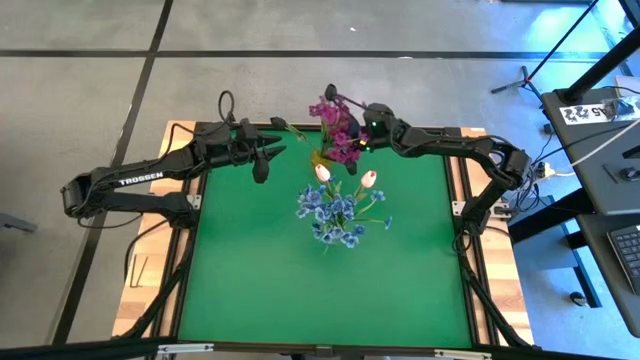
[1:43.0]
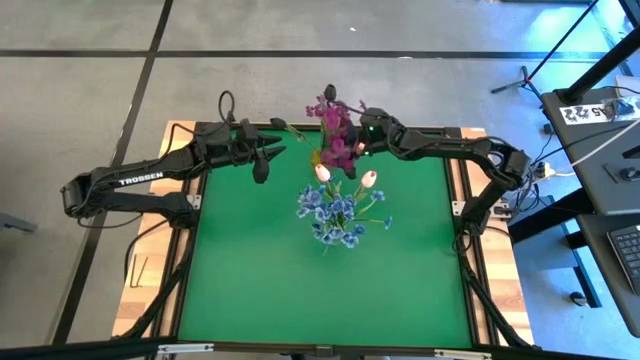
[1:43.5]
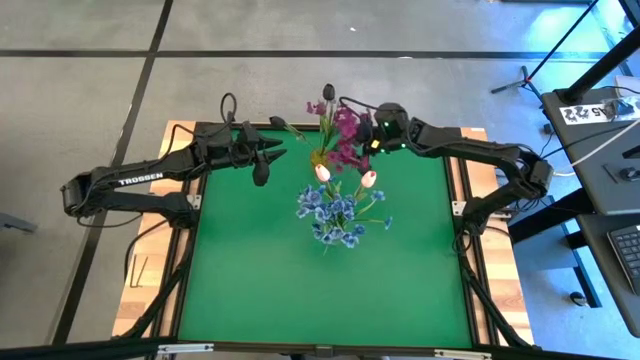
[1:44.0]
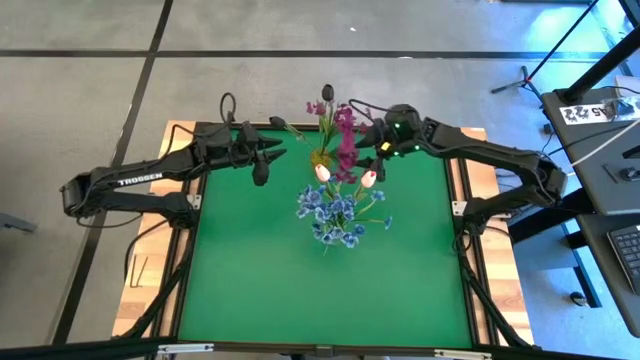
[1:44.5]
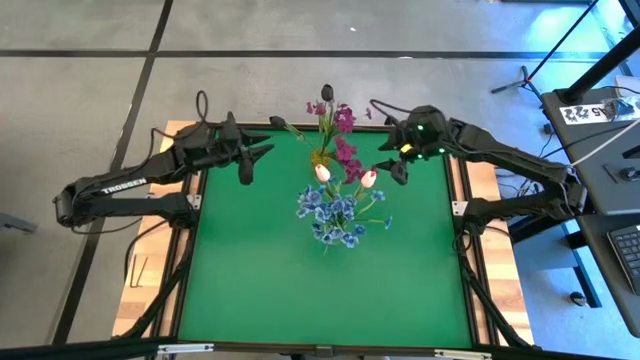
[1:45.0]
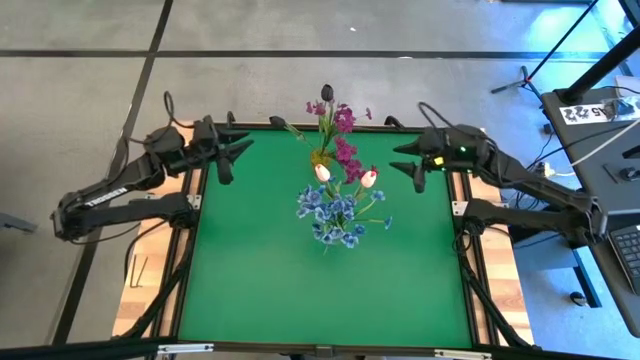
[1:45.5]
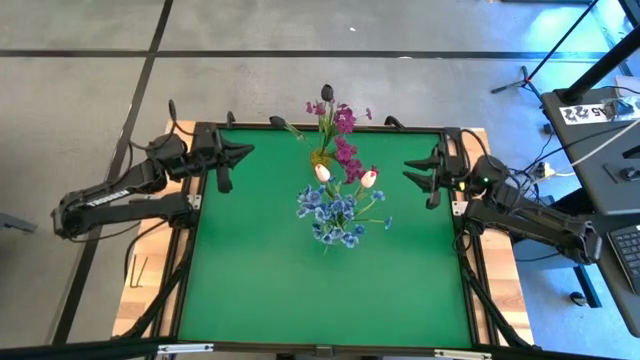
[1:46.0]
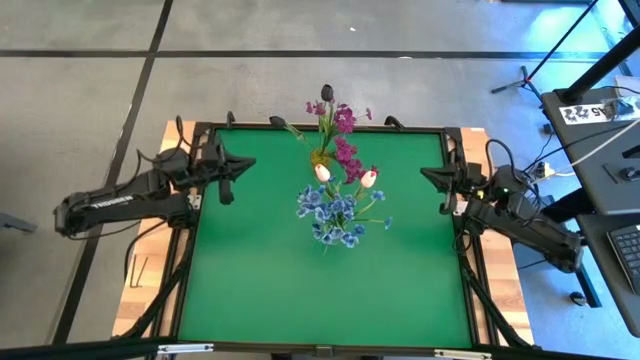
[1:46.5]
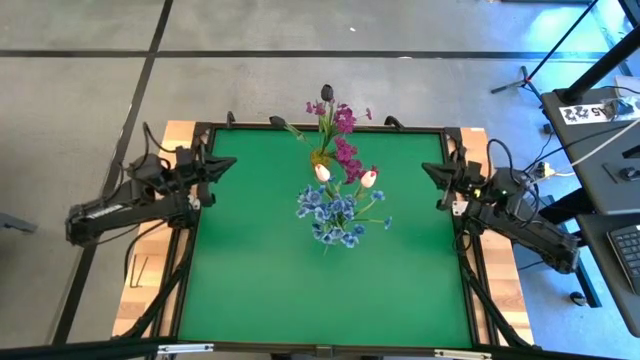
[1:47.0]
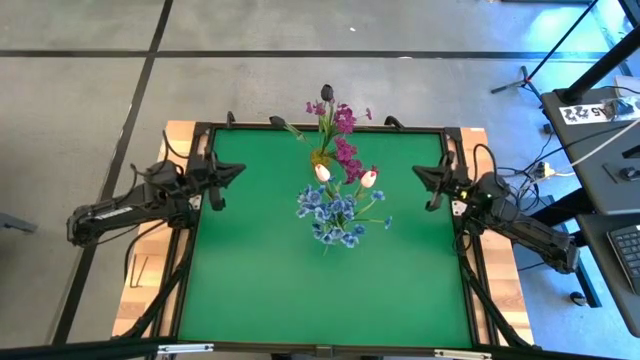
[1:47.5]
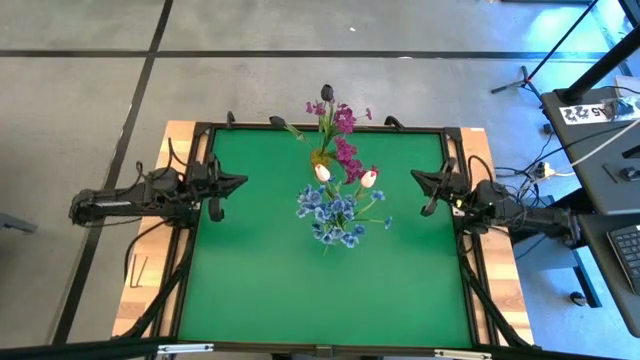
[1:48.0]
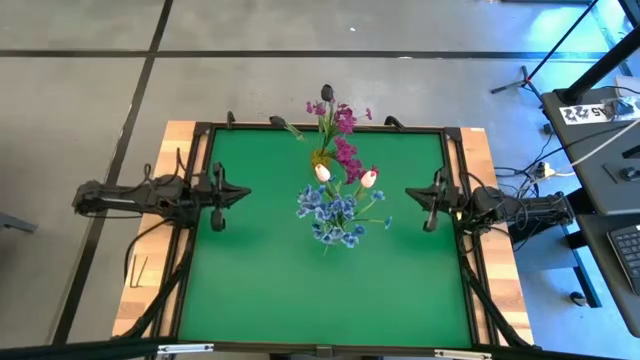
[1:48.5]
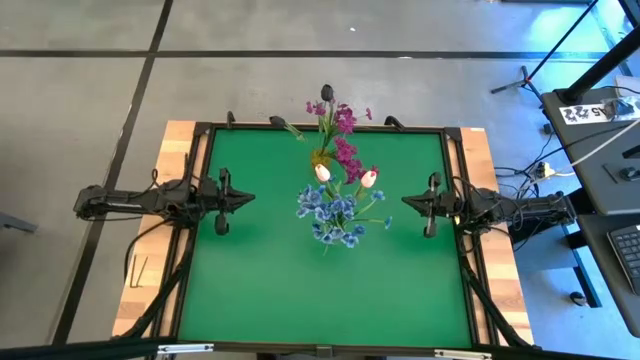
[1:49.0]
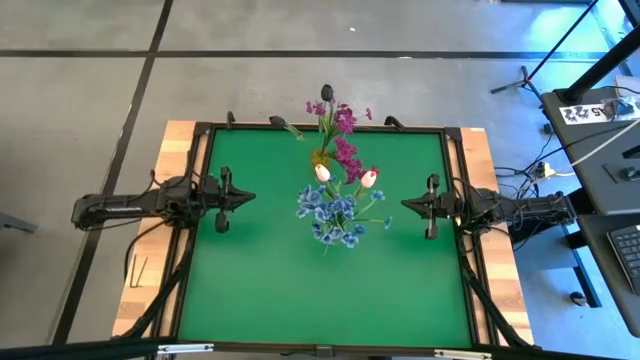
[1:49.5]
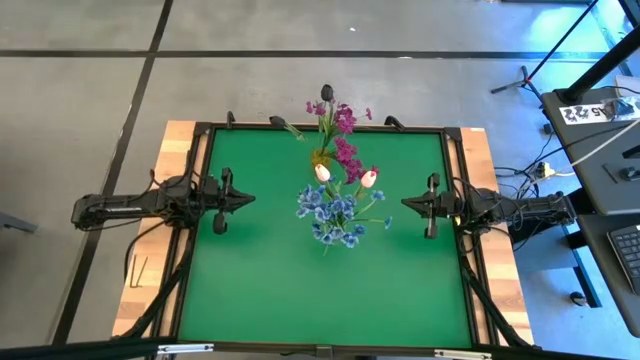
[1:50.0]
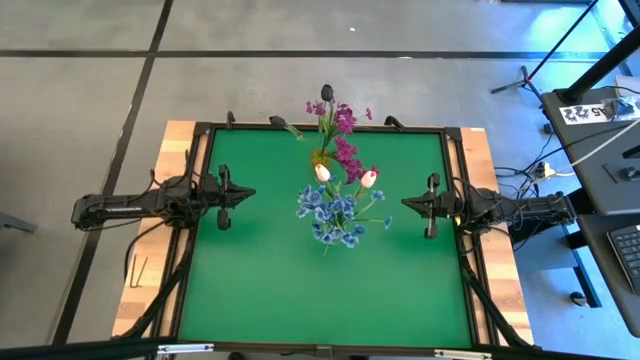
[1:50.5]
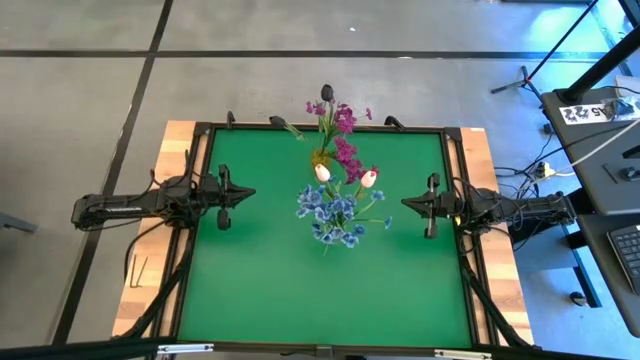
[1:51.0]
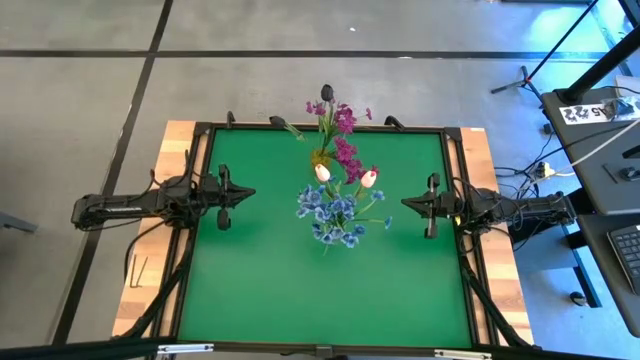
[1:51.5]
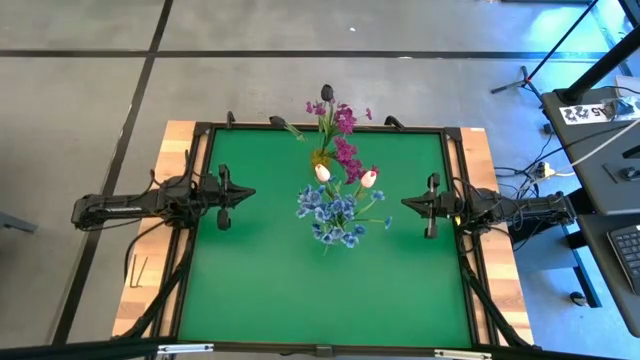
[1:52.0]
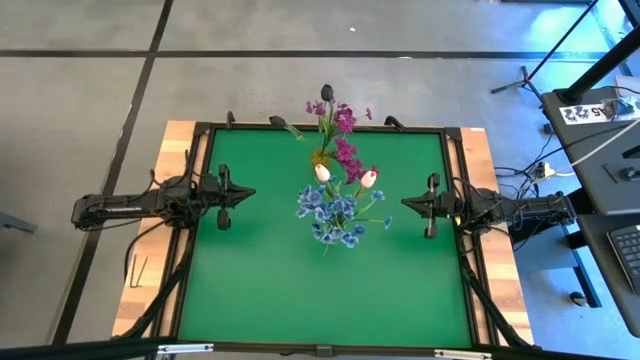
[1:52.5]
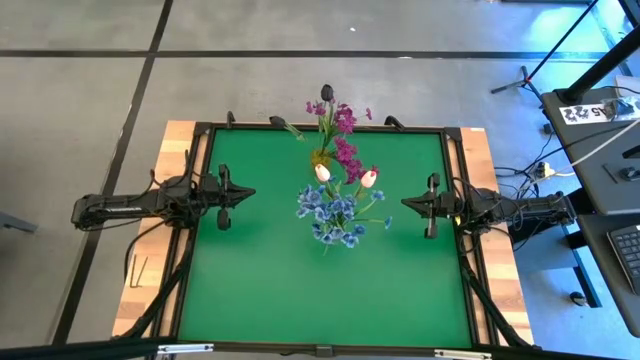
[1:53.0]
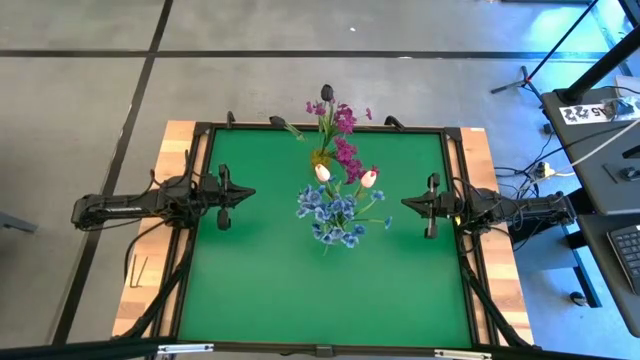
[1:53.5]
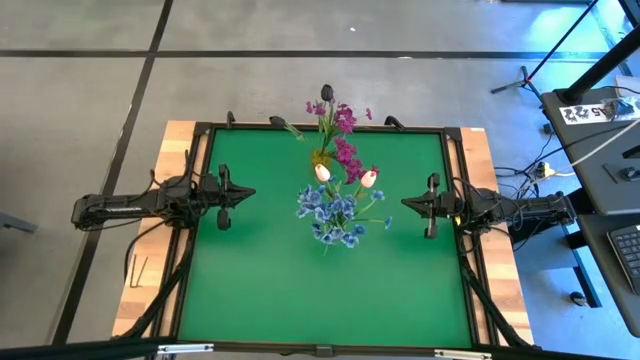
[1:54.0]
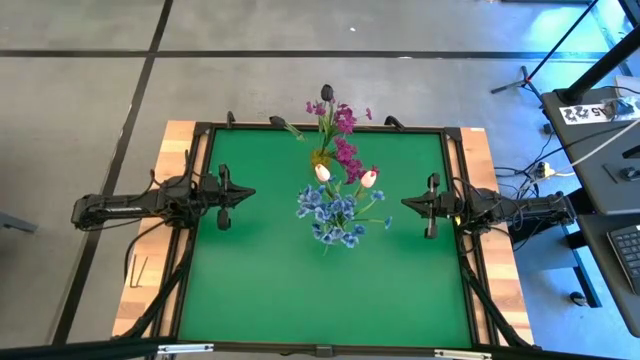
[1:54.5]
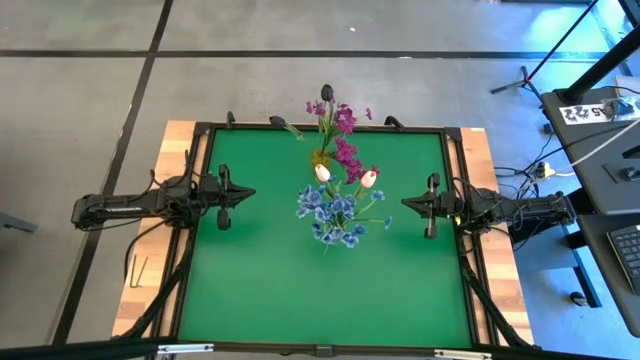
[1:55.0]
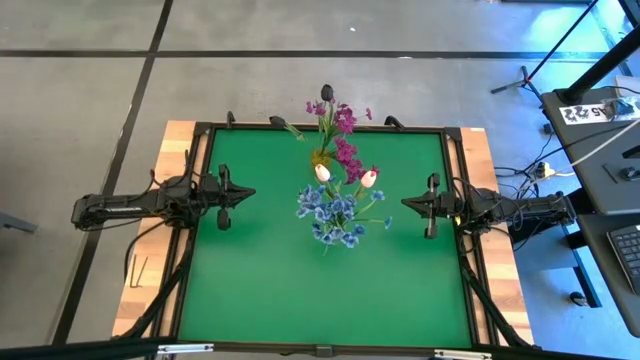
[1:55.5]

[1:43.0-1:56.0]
Task: Sort flowers into vase by color
Return to Home Position

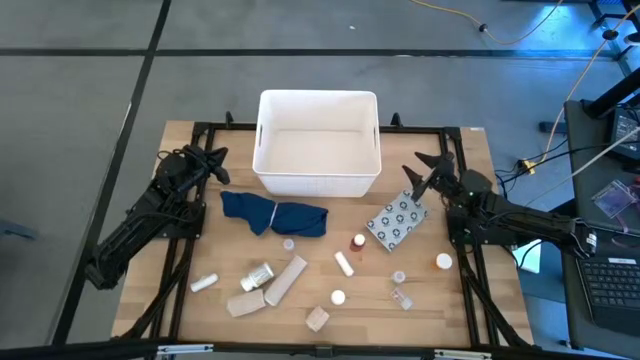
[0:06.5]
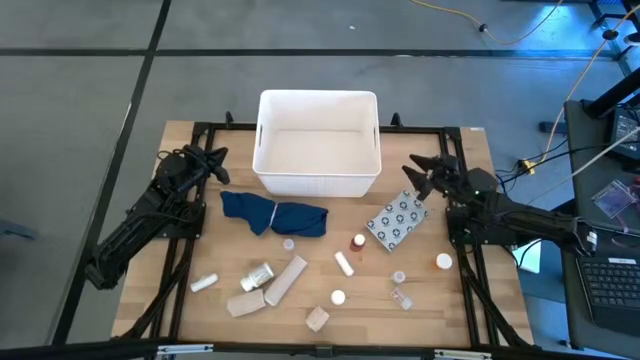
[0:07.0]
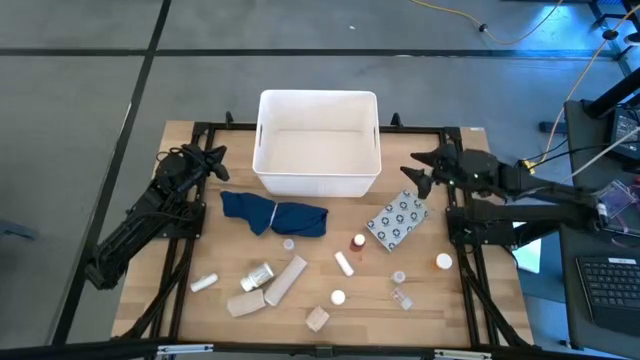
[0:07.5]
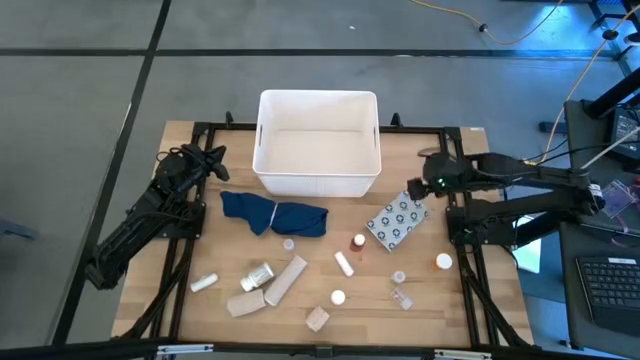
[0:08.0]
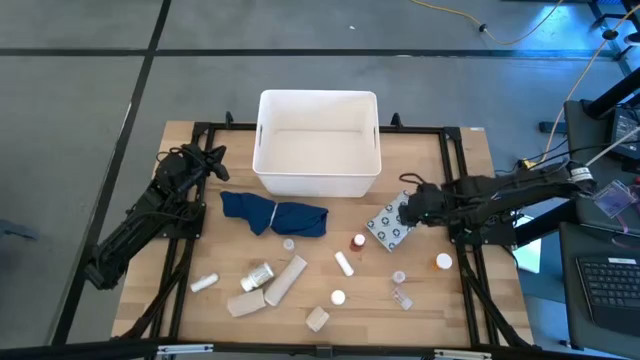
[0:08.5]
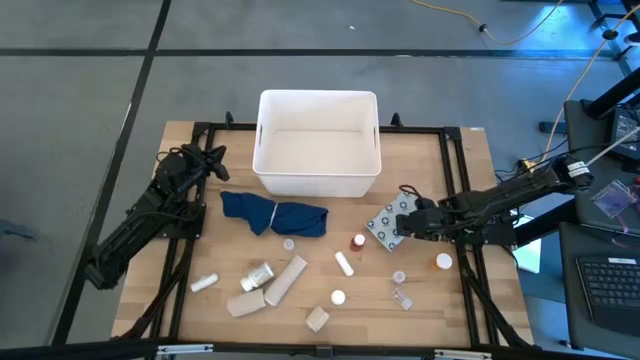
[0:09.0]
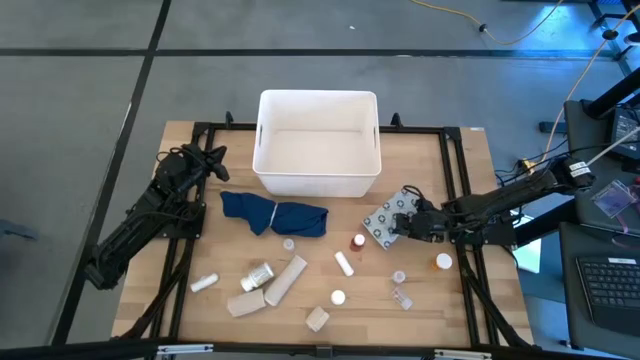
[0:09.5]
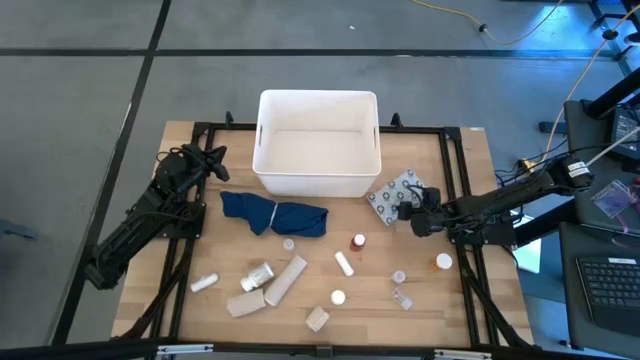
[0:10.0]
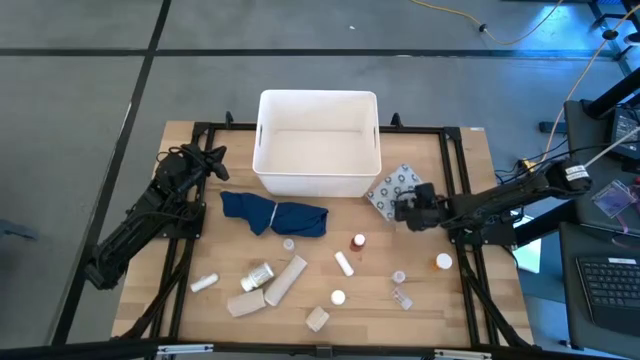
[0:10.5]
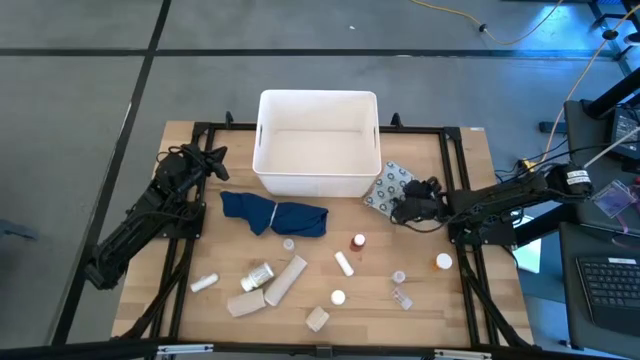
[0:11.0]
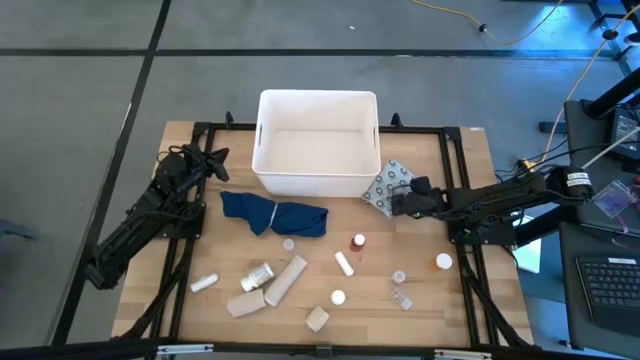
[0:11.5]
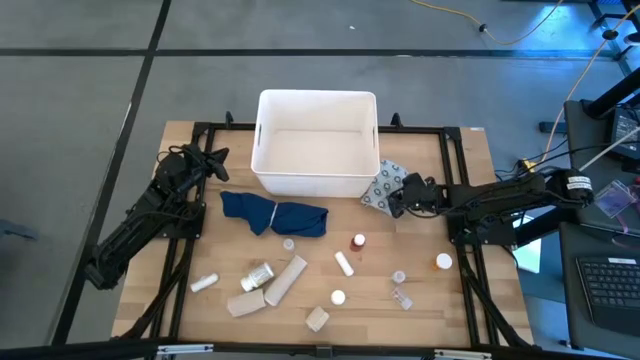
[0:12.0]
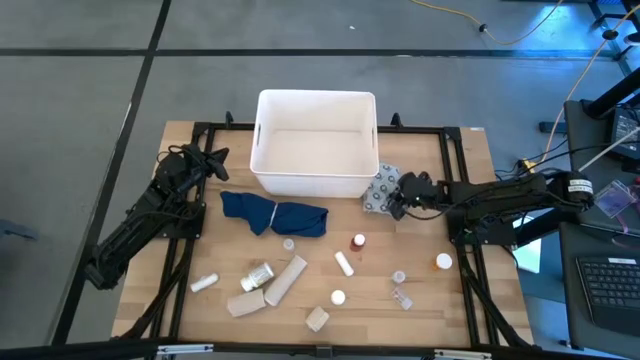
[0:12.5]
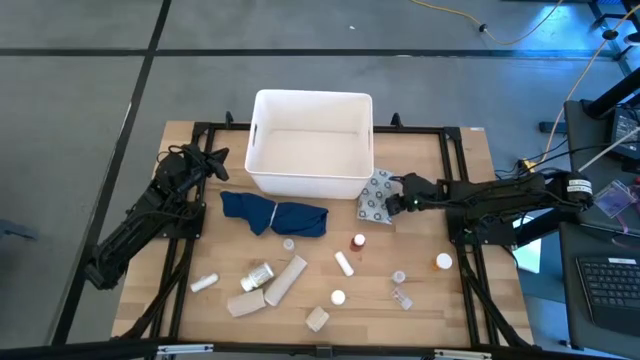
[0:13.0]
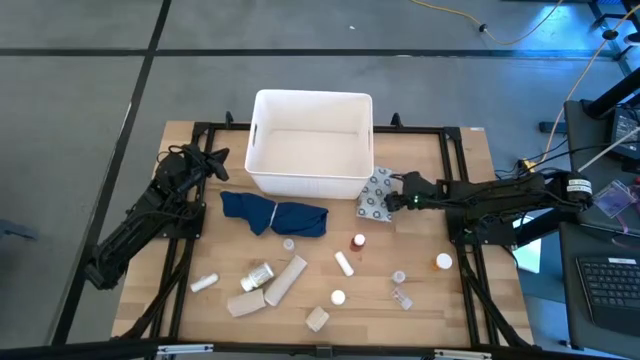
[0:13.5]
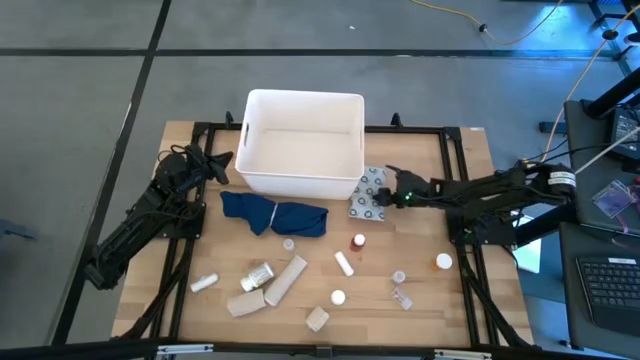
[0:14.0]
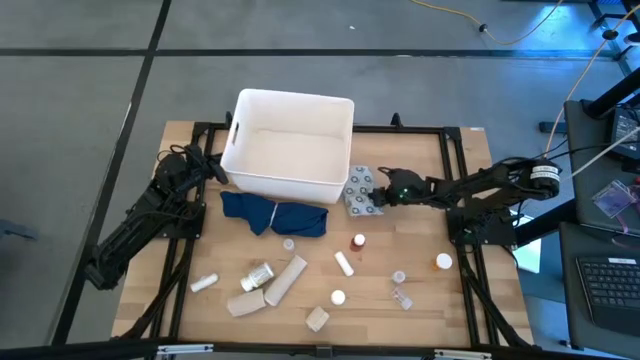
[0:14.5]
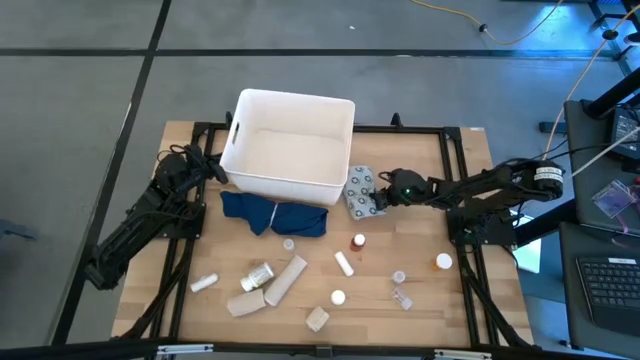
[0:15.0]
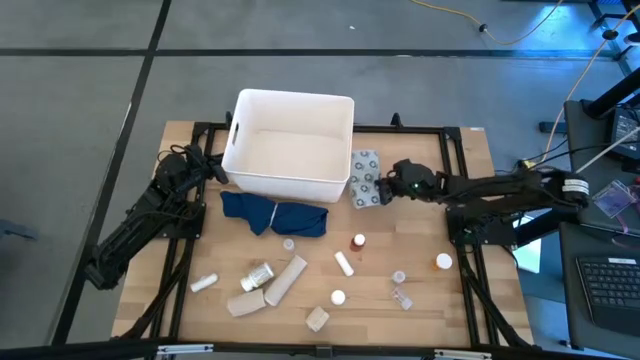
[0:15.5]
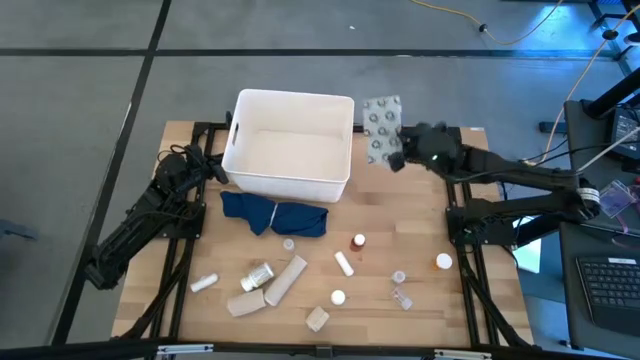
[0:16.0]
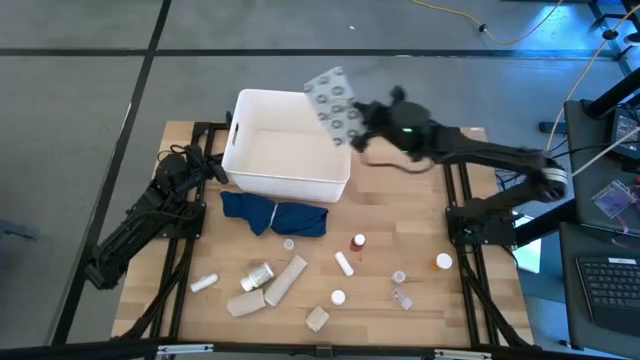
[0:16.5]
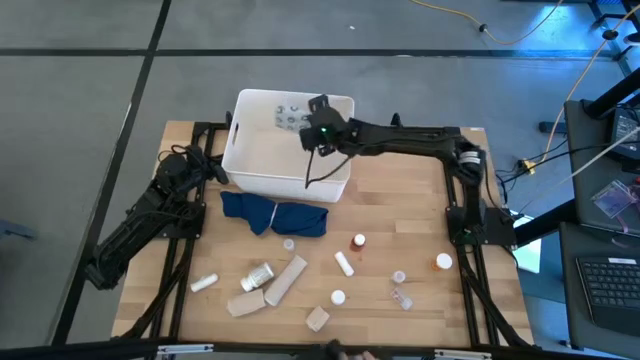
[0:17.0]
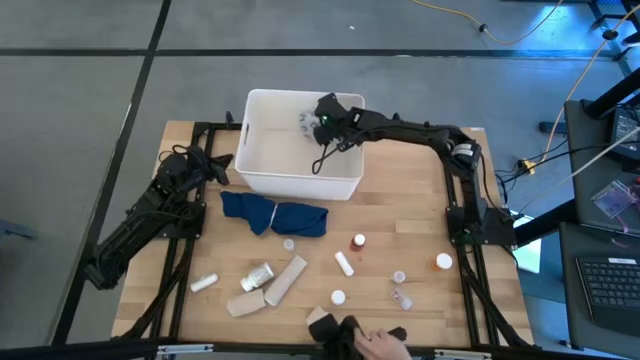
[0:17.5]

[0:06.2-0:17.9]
Task: Pick & place medical supplies in basket/bin
Put the light blue mailer bag into the white bin
